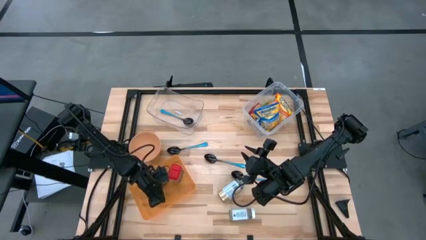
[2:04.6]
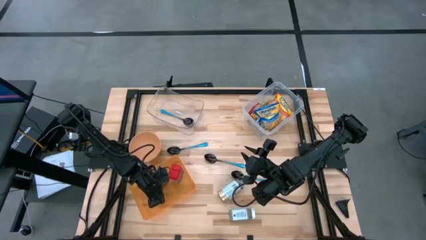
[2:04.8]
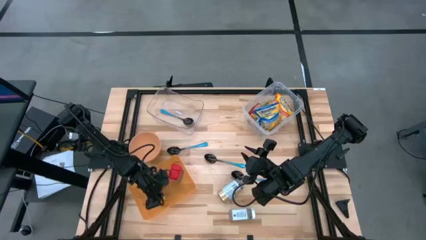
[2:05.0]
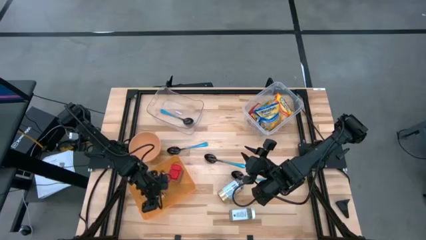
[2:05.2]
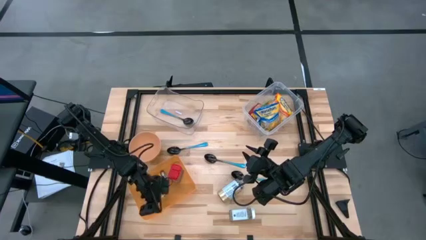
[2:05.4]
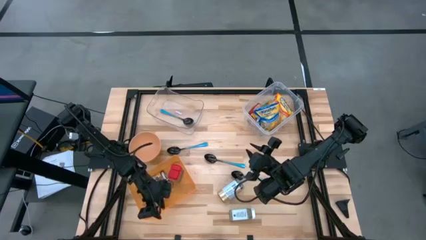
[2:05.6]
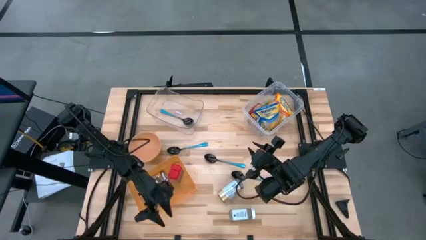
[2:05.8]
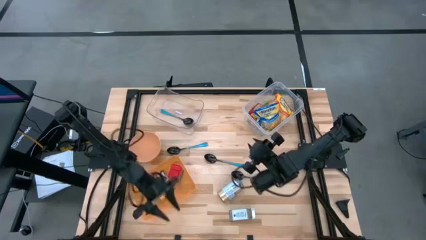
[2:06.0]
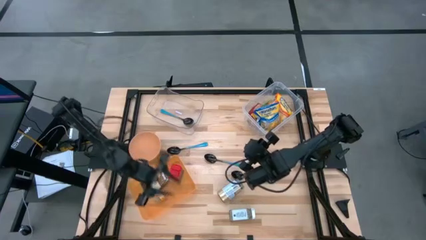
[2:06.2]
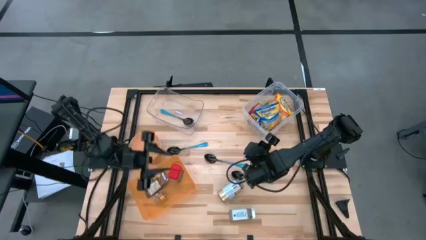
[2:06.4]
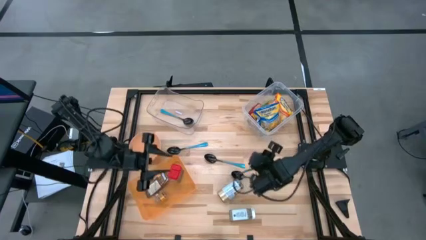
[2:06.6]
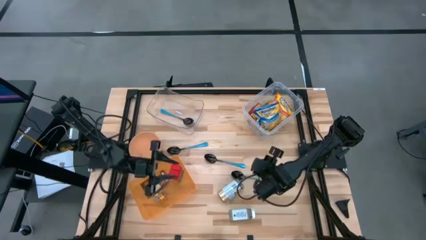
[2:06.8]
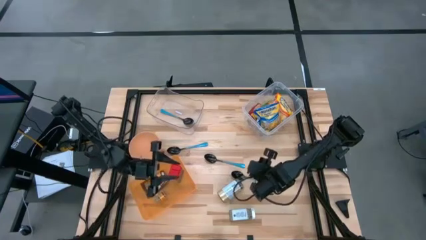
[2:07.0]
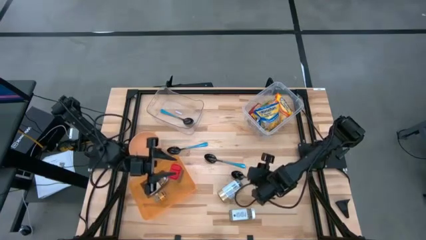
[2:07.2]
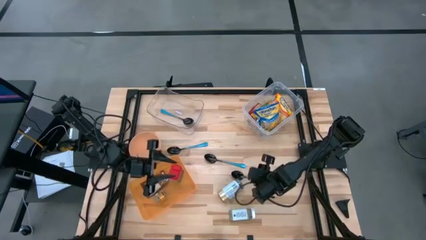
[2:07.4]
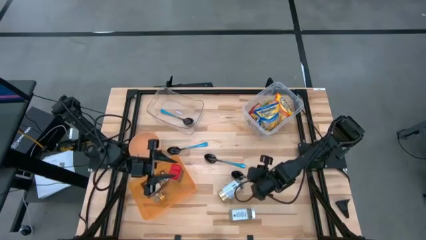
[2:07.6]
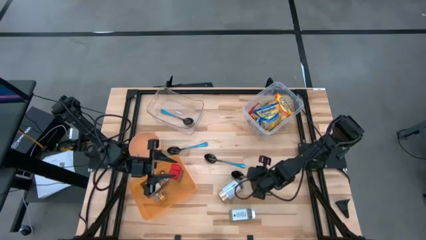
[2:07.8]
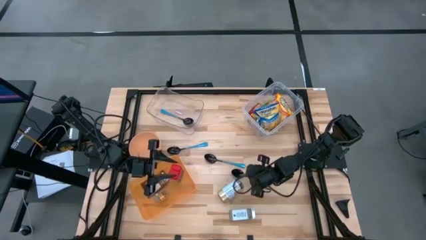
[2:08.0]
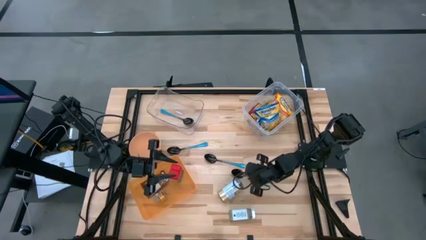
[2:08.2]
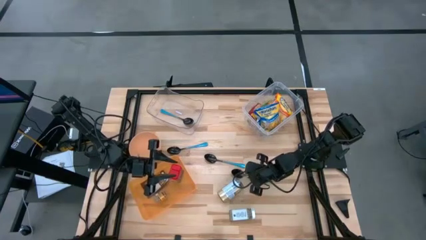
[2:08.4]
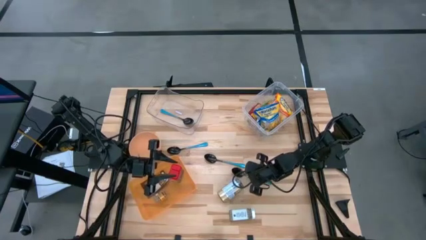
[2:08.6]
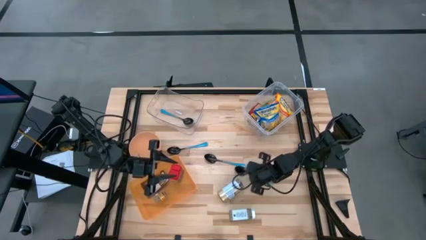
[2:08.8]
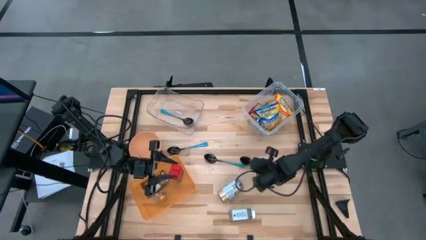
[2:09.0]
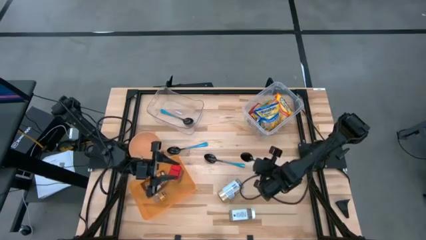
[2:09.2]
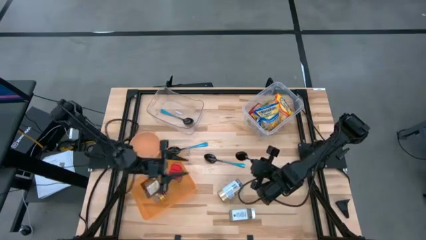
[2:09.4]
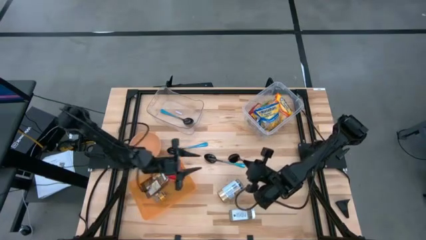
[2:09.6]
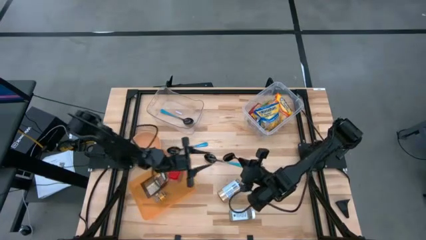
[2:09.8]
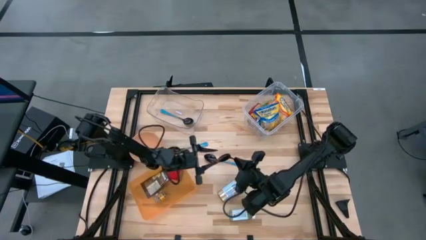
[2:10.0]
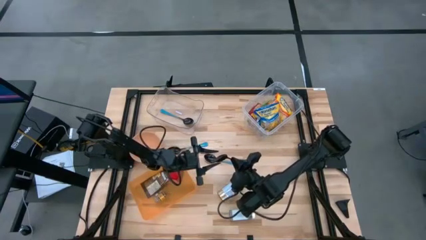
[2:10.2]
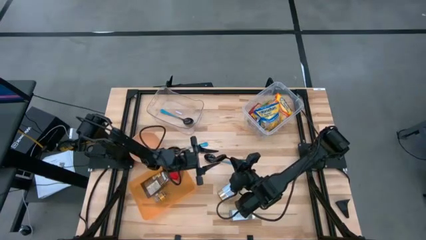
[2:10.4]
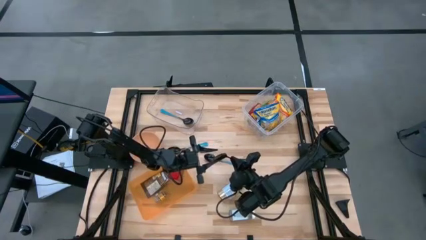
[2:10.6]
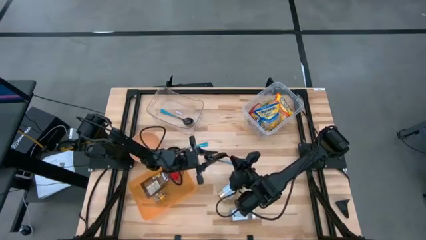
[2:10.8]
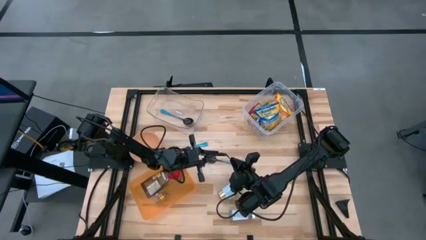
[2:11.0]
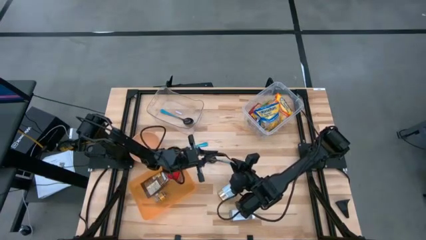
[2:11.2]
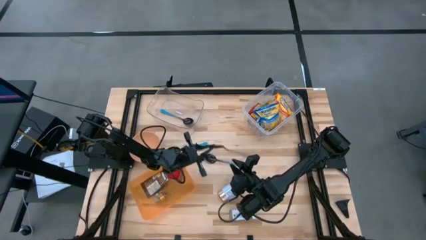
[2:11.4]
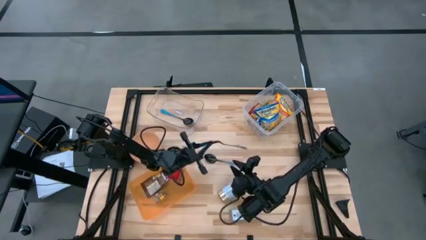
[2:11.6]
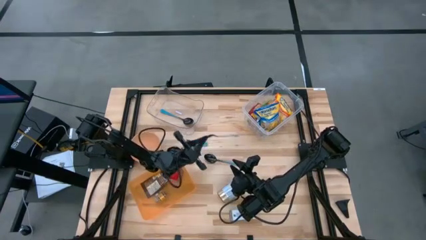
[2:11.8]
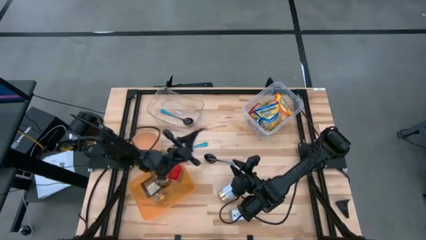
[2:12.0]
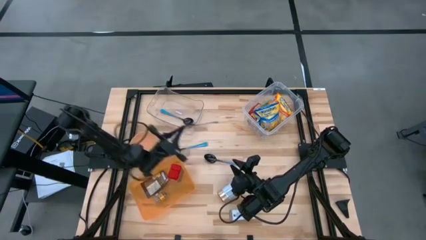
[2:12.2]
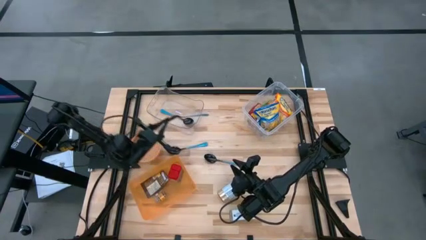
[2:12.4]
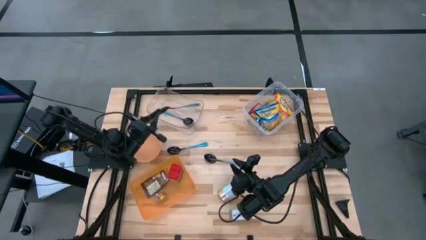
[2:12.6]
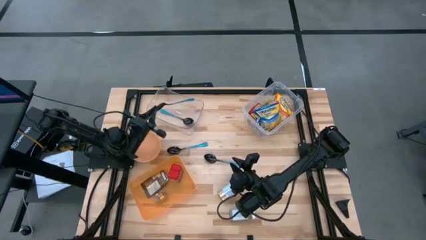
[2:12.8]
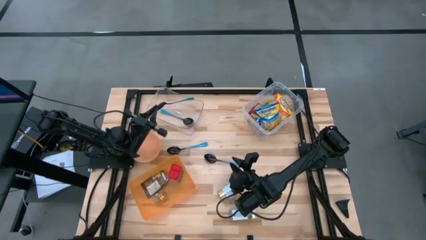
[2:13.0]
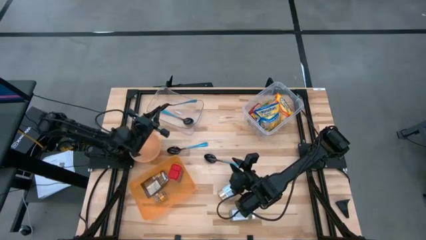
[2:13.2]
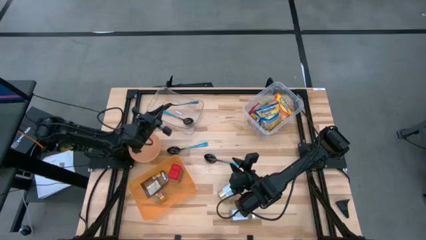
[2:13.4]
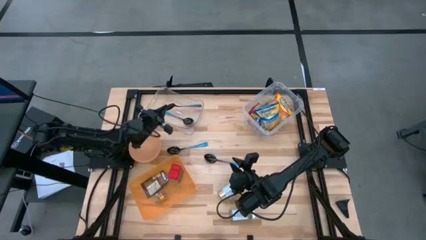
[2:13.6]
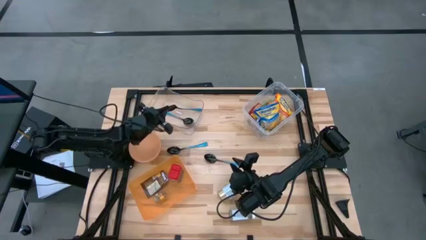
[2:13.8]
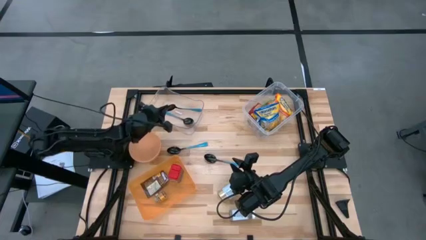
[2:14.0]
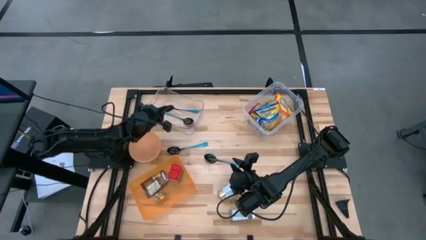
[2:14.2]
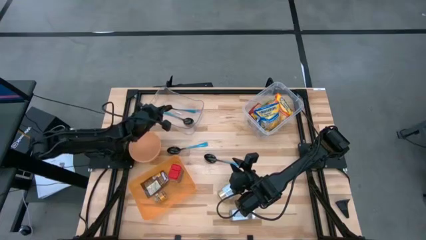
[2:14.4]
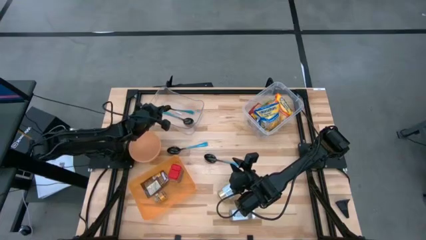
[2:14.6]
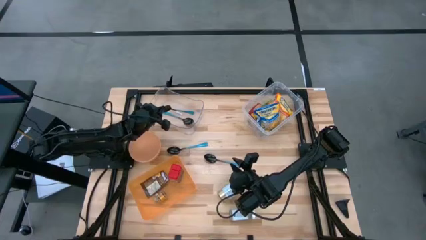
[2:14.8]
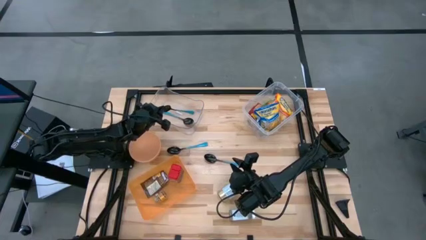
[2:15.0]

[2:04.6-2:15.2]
Task: Pick & Place Food Item
Put the blue spoon into the left transparent bin
